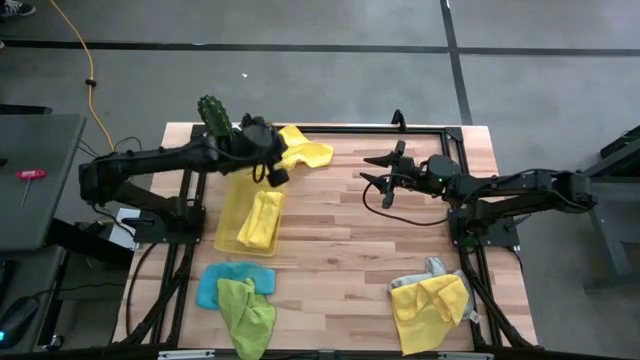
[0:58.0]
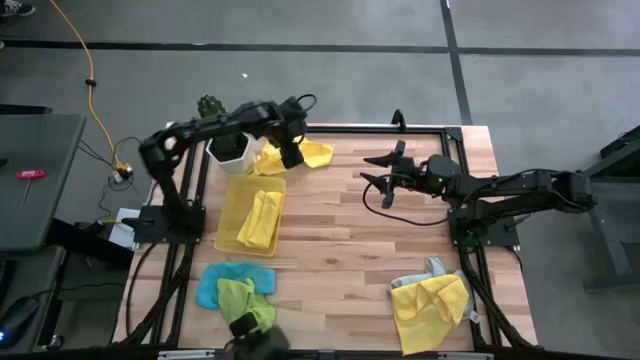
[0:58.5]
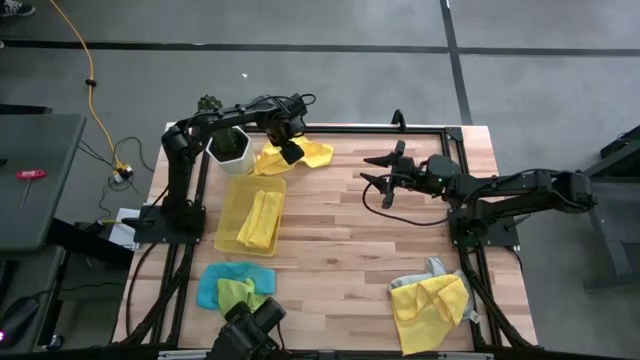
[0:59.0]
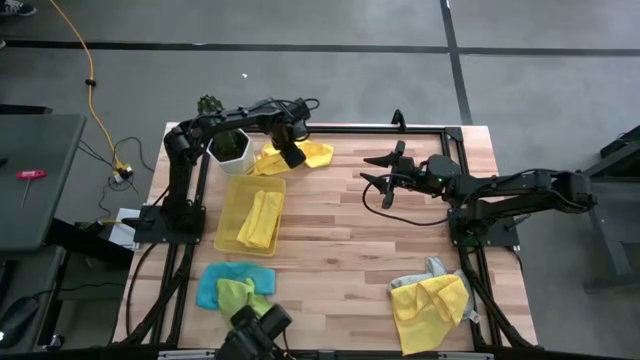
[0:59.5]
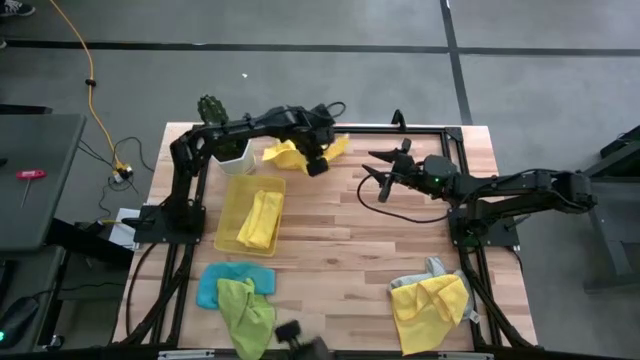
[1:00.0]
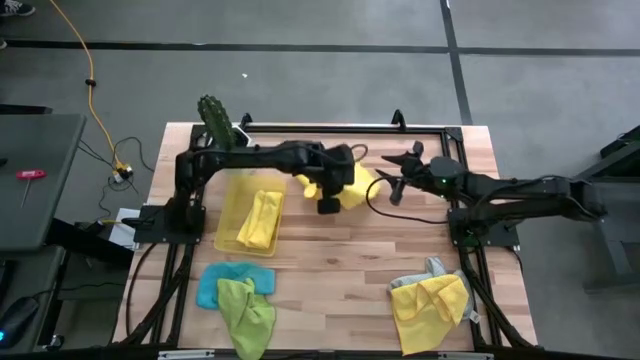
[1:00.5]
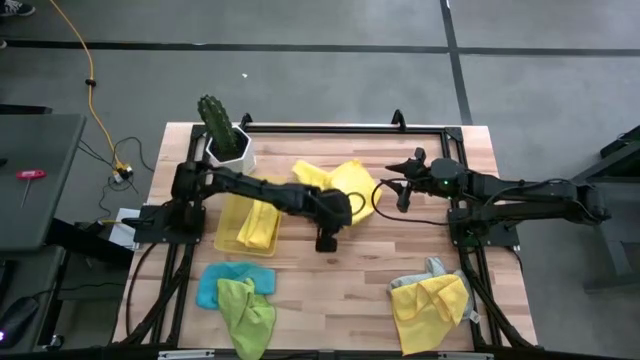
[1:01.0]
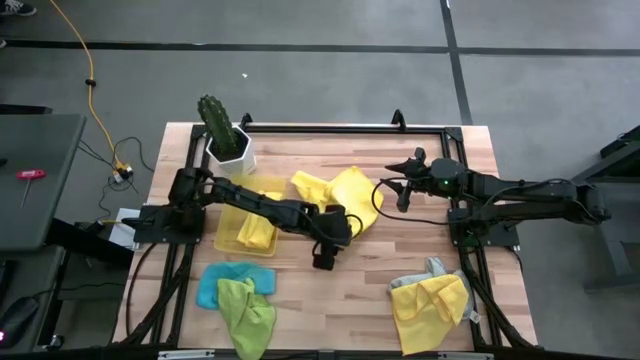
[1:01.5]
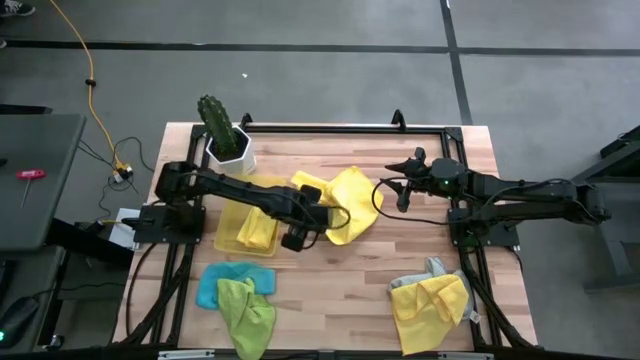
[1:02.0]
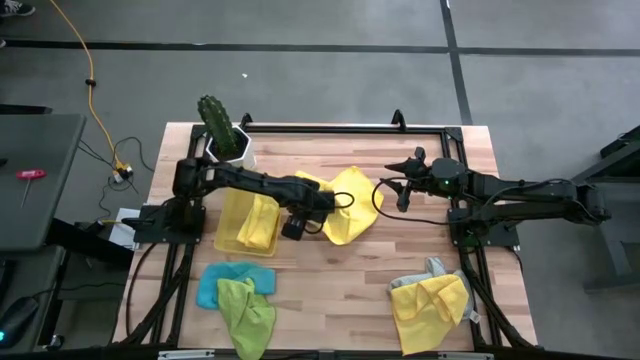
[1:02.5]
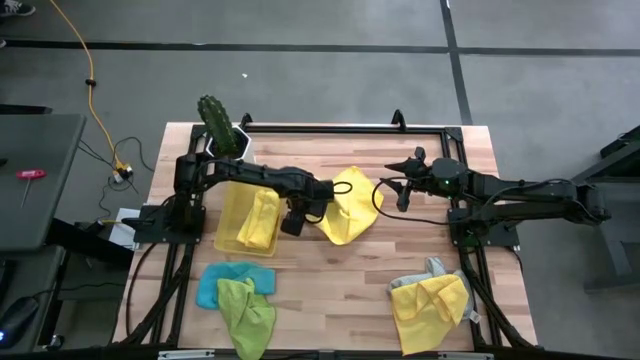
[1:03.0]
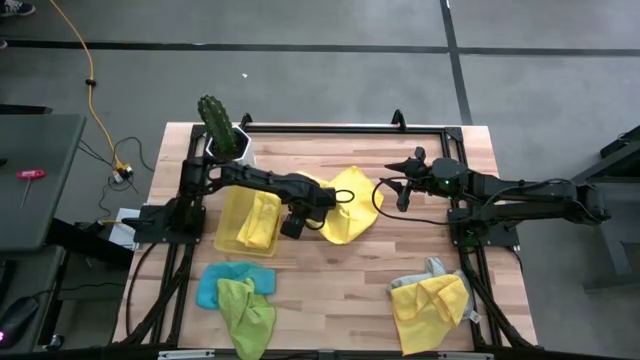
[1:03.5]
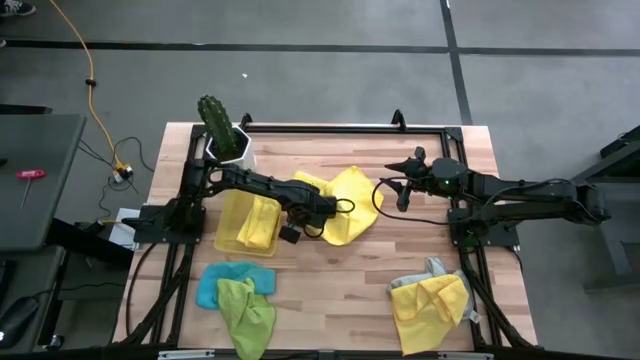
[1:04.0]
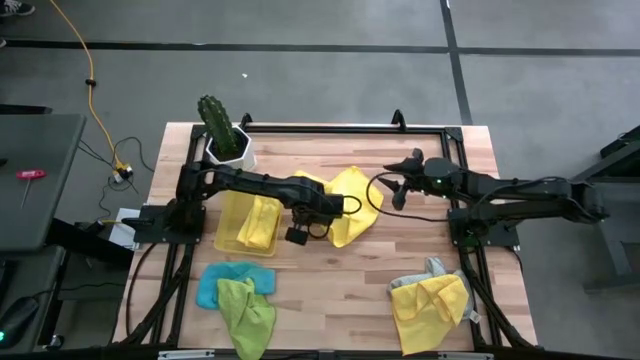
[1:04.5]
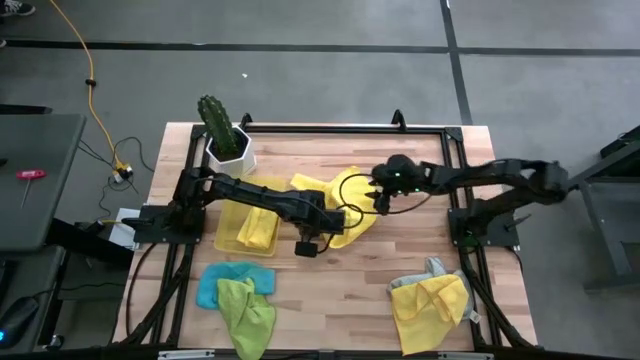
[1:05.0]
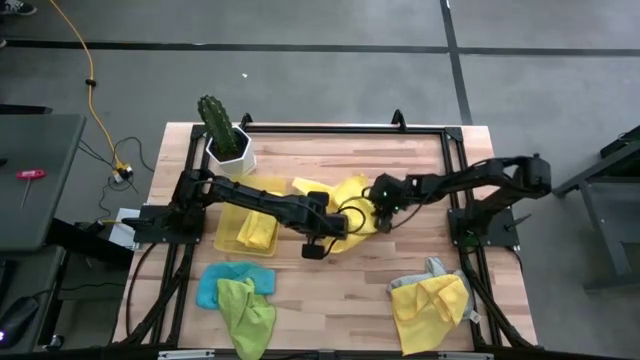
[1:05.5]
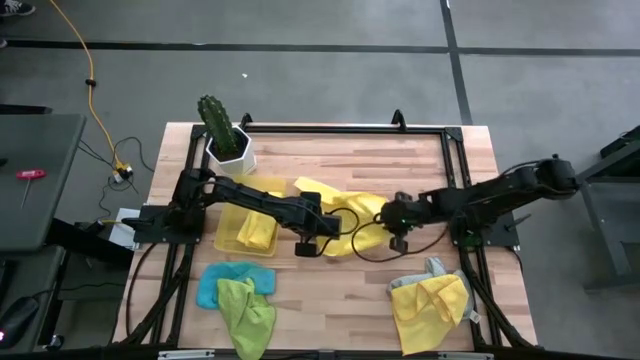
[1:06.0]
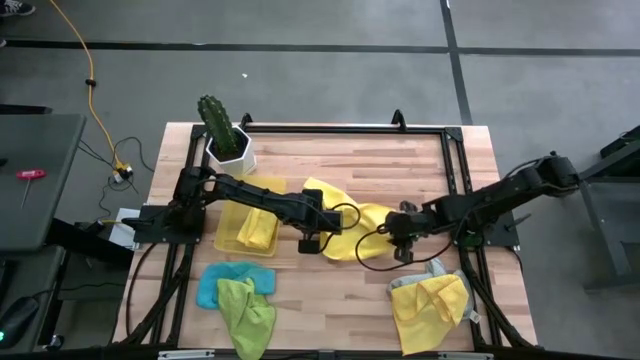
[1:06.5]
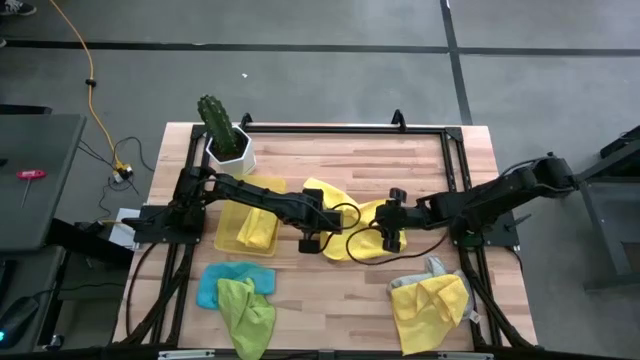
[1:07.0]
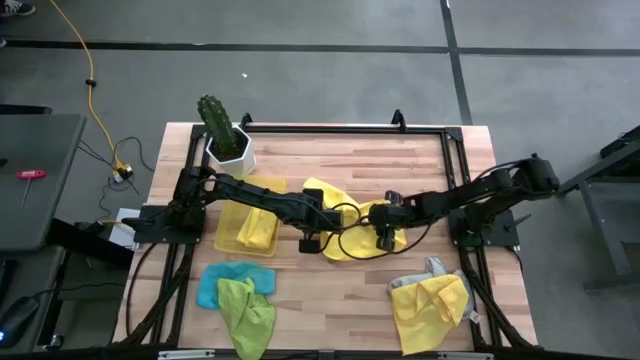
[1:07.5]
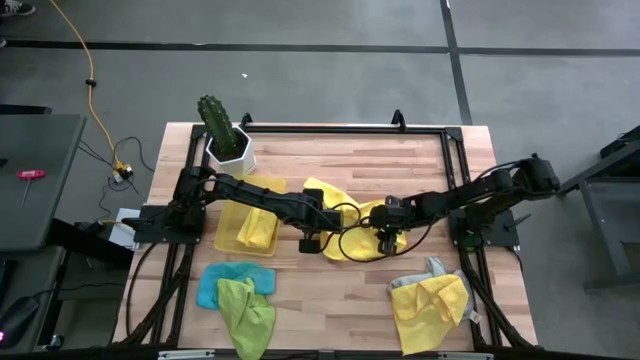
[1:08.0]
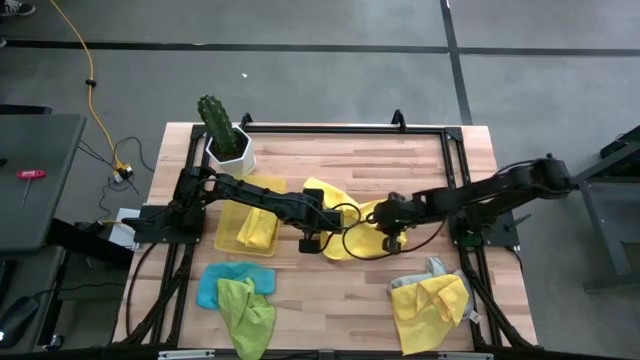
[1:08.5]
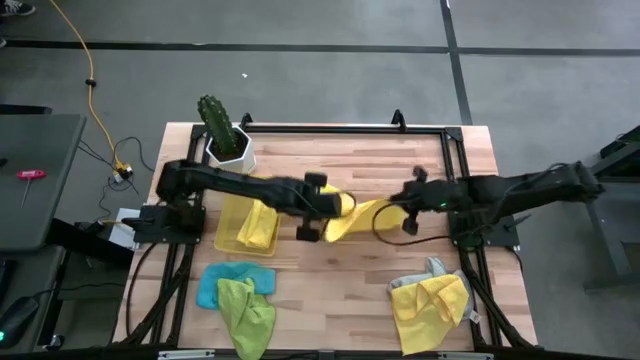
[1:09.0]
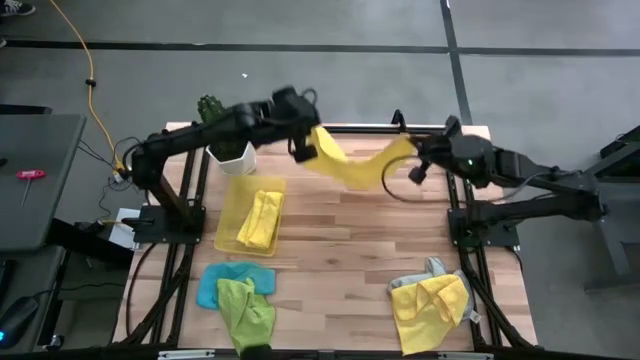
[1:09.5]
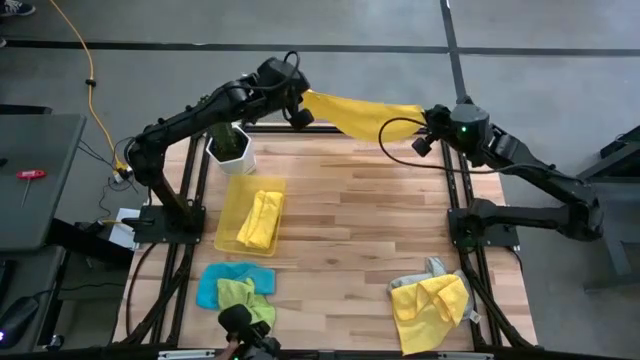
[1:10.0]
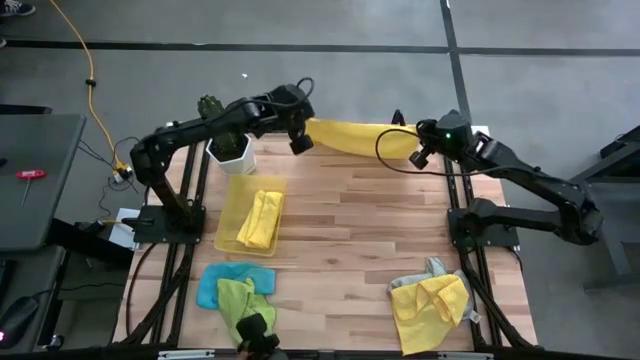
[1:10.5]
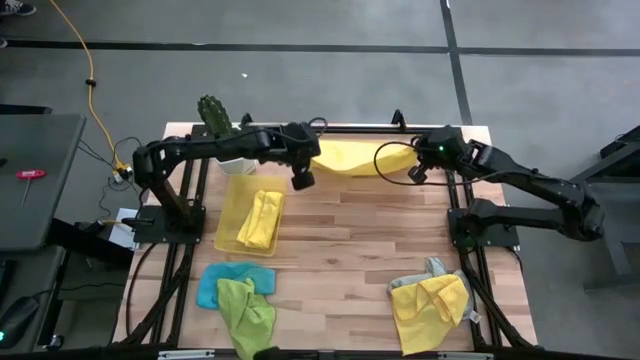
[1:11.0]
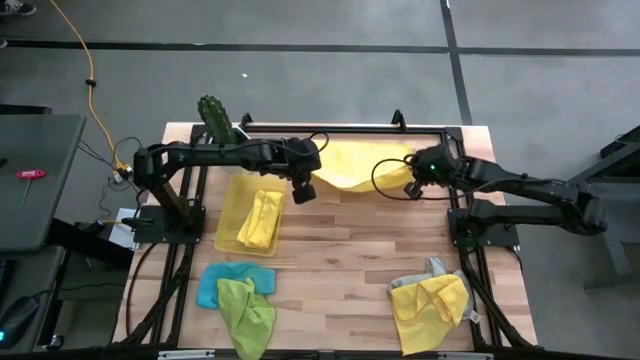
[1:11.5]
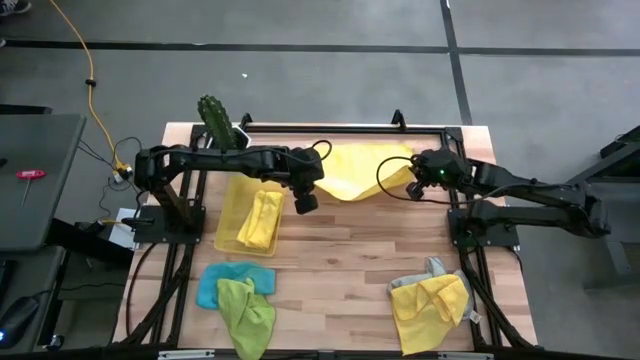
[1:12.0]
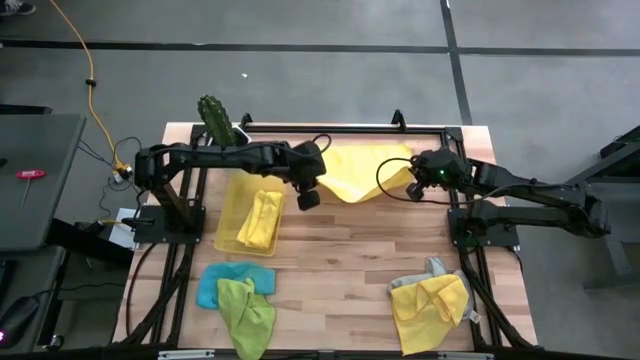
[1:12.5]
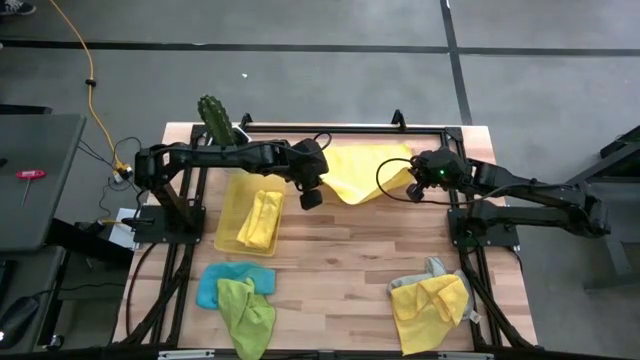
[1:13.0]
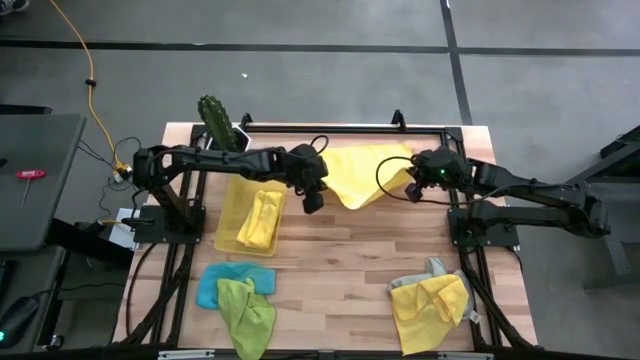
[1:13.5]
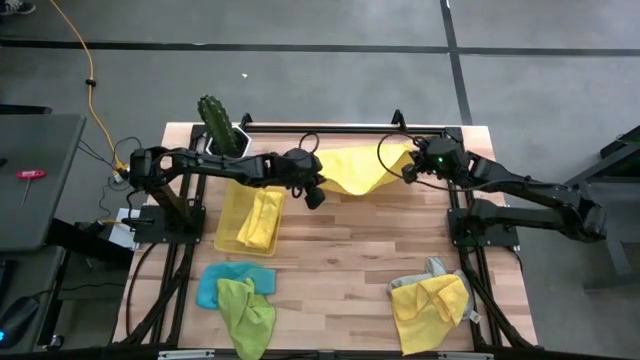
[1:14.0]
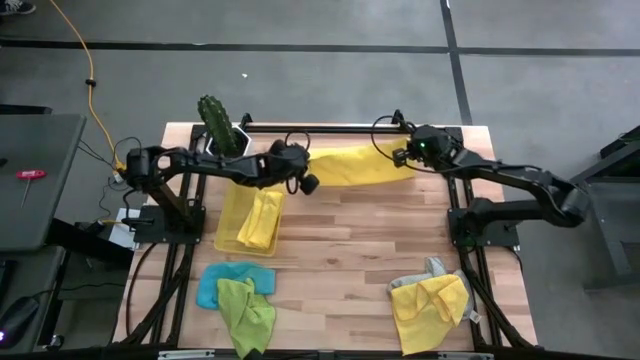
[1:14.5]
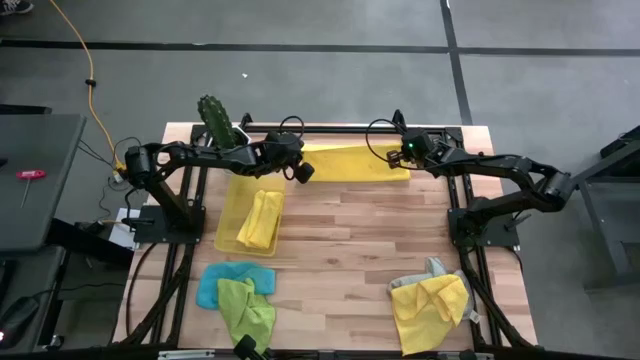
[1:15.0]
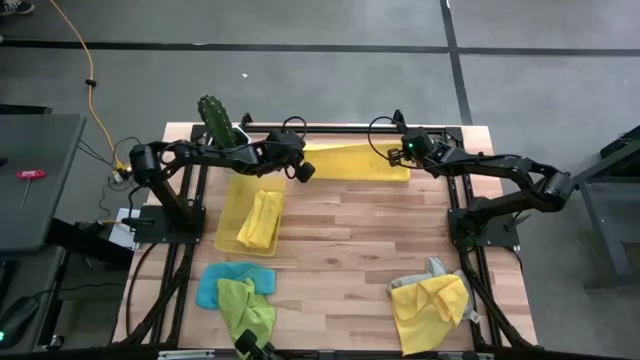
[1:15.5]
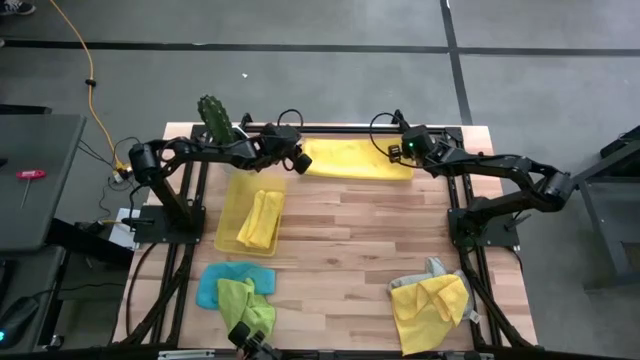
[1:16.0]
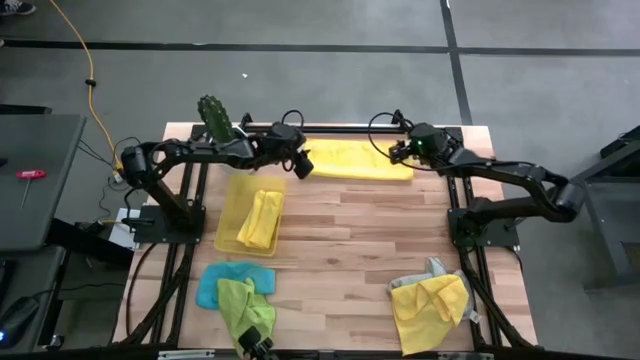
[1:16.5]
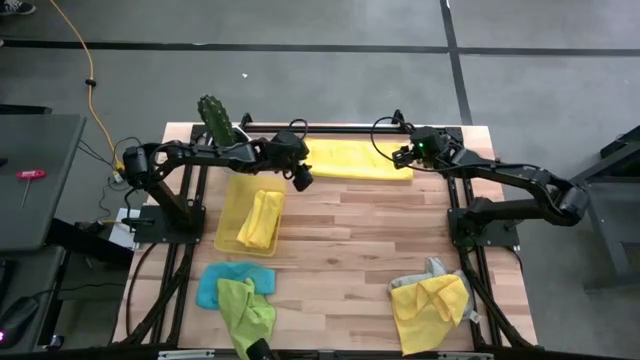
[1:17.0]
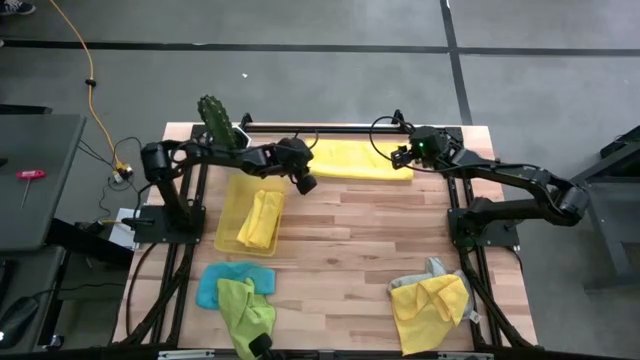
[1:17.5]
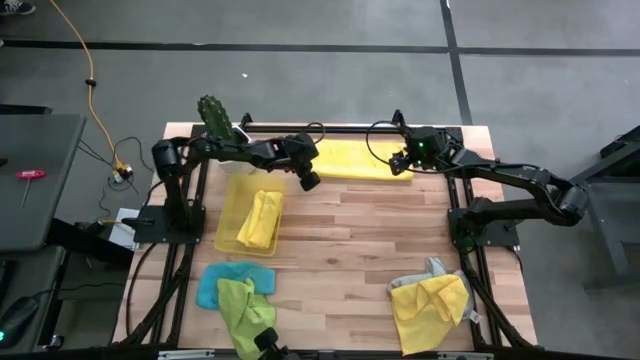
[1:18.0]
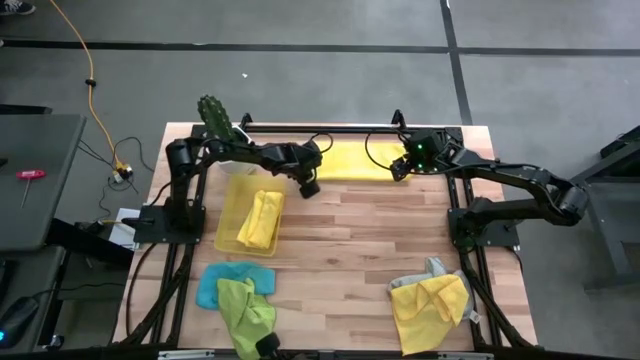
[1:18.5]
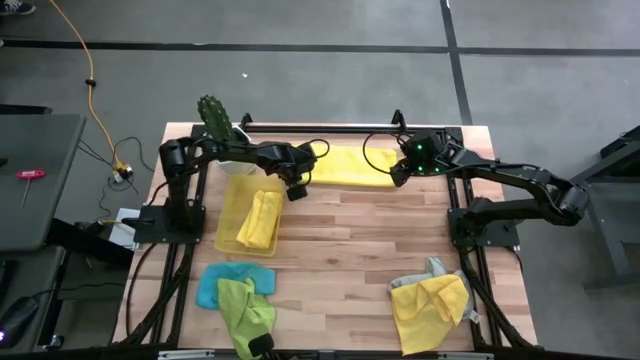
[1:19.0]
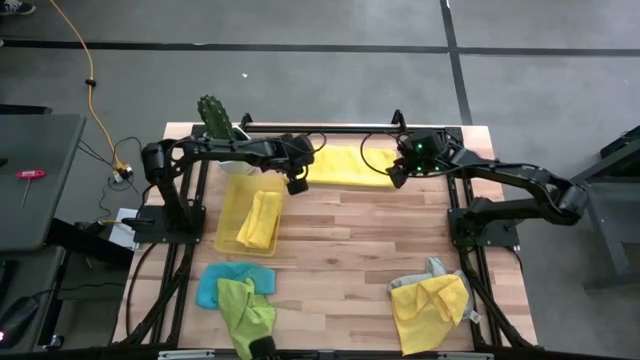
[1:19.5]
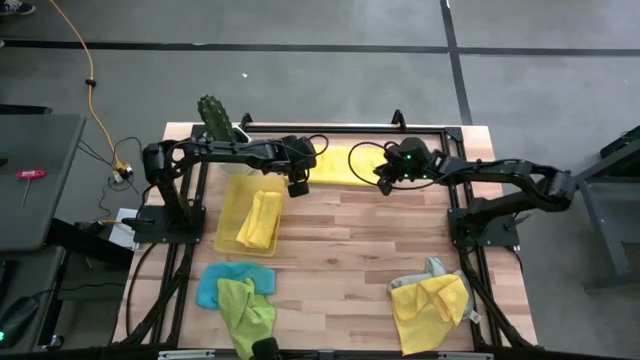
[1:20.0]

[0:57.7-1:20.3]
Task: Fold microfiber towels
Fold the top yellow microfiber towel

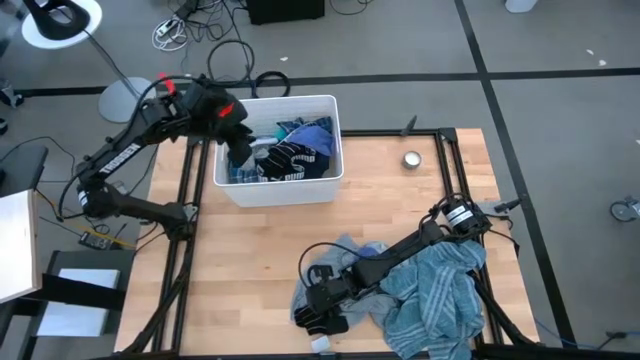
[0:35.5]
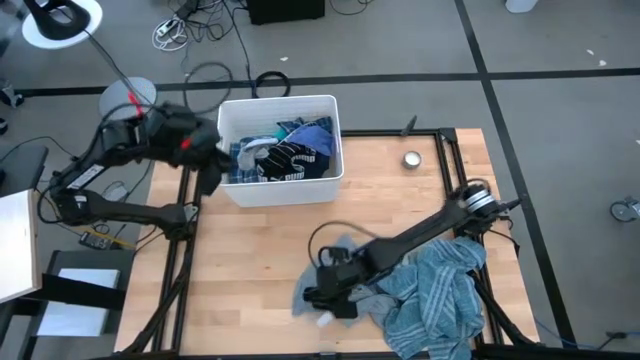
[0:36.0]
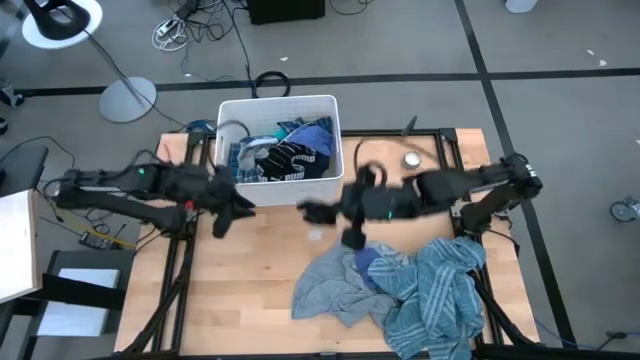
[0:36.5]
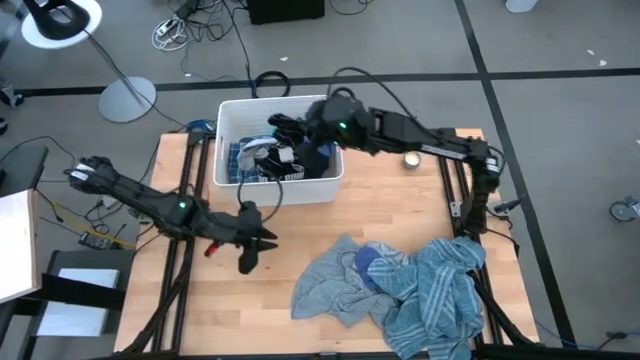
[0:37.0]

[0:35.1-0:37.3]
Task: Sort clothes
Put the black sock into the white laundry bin
